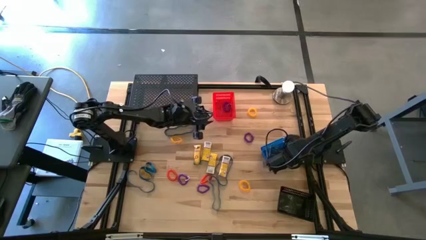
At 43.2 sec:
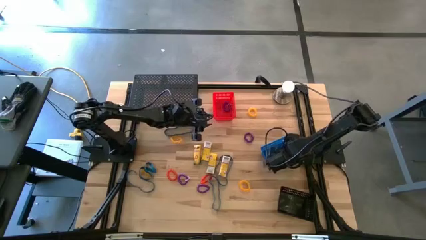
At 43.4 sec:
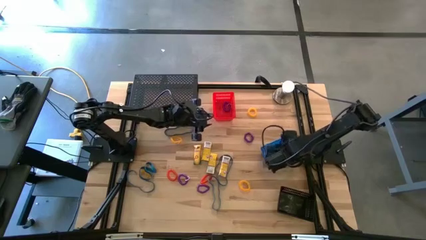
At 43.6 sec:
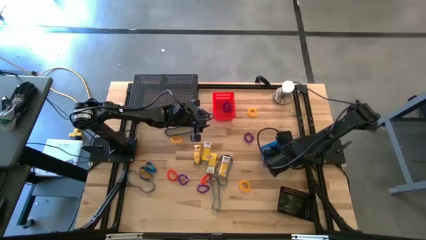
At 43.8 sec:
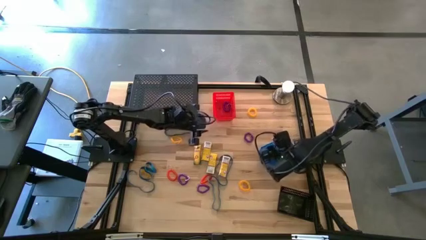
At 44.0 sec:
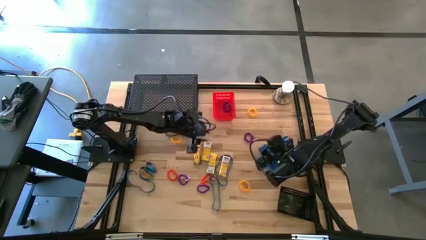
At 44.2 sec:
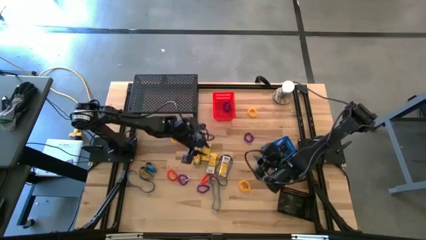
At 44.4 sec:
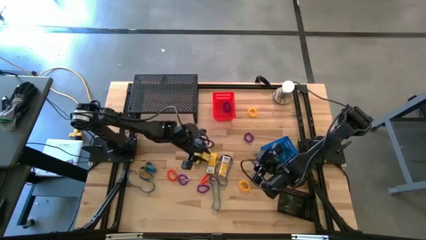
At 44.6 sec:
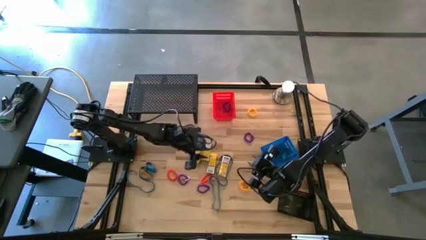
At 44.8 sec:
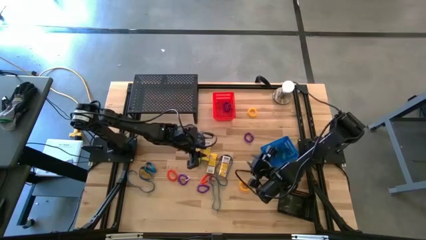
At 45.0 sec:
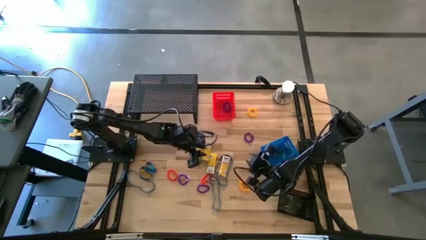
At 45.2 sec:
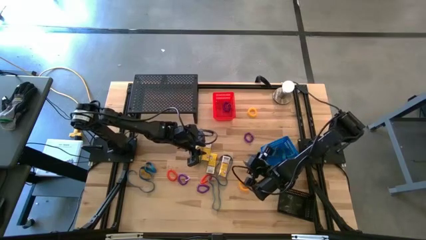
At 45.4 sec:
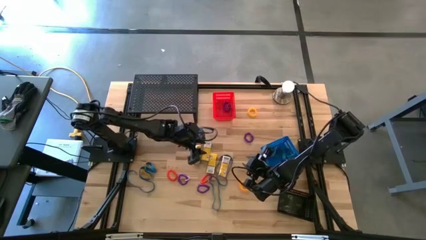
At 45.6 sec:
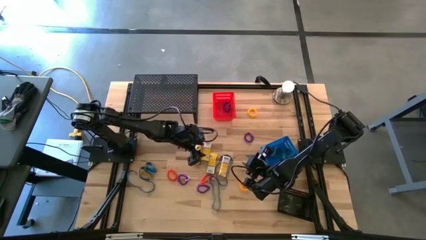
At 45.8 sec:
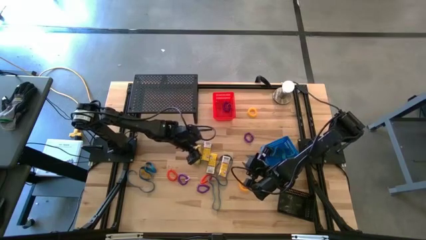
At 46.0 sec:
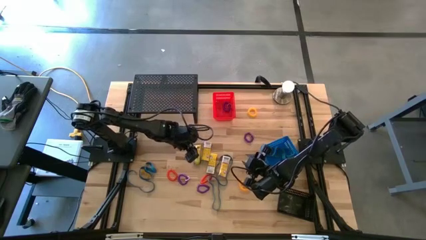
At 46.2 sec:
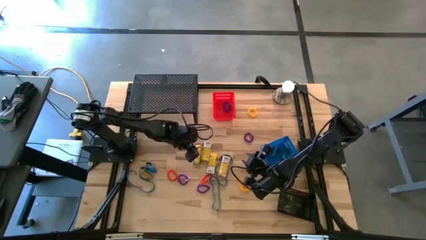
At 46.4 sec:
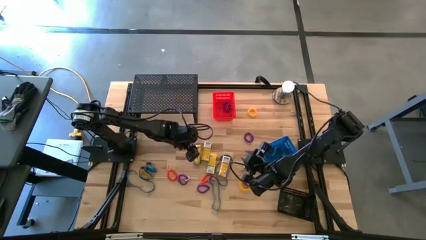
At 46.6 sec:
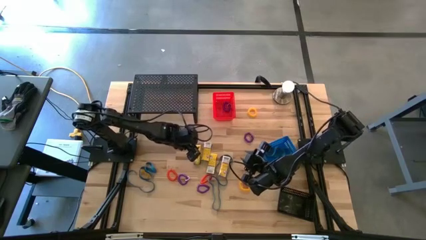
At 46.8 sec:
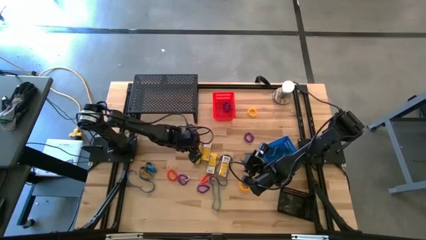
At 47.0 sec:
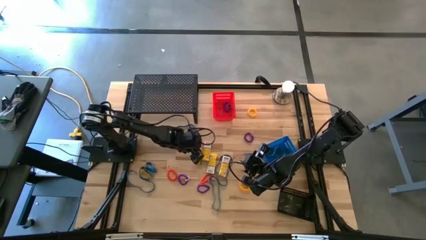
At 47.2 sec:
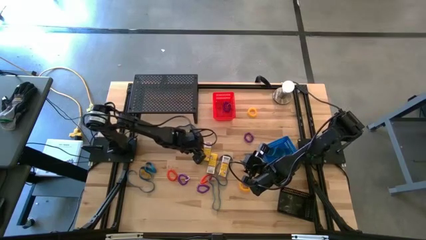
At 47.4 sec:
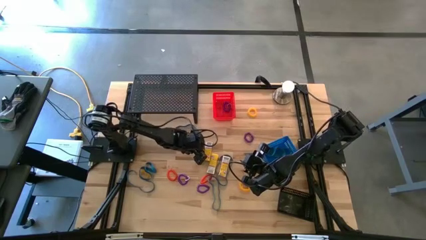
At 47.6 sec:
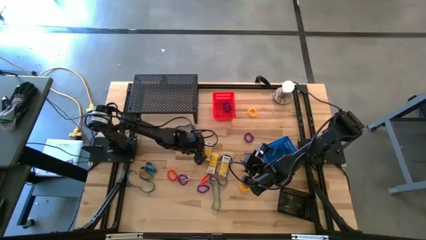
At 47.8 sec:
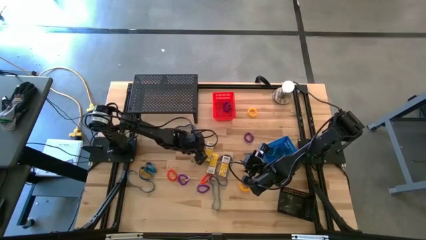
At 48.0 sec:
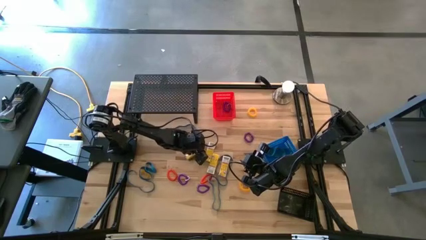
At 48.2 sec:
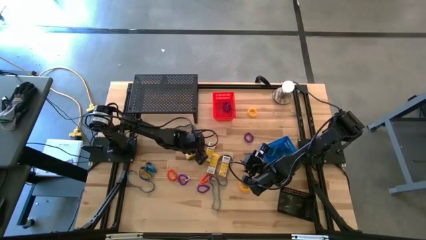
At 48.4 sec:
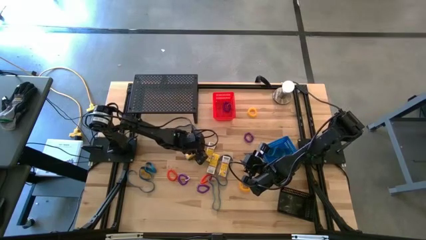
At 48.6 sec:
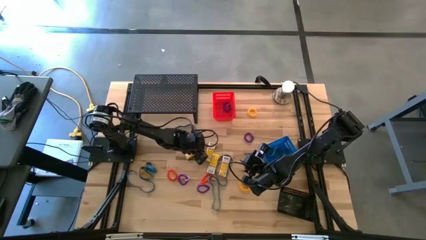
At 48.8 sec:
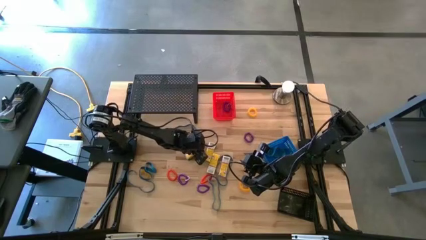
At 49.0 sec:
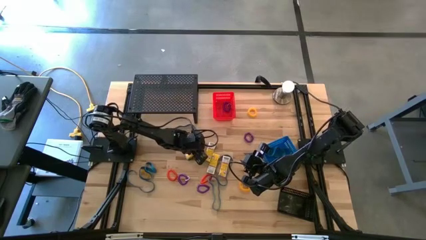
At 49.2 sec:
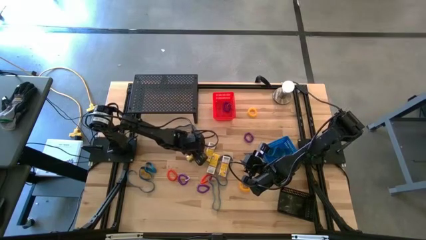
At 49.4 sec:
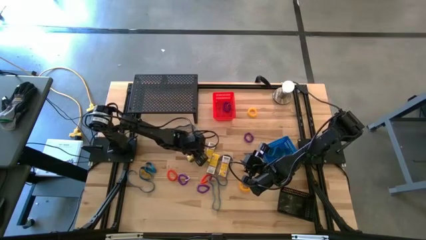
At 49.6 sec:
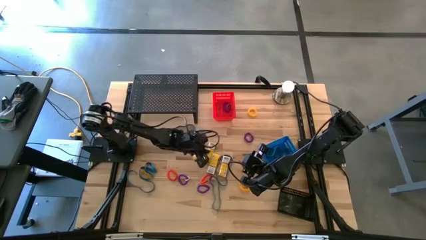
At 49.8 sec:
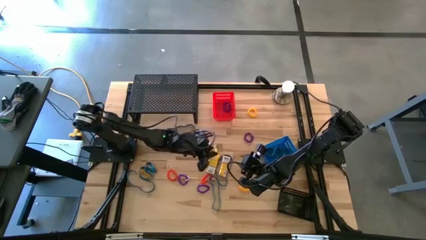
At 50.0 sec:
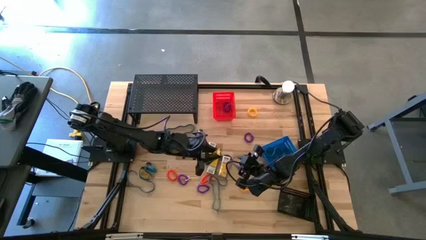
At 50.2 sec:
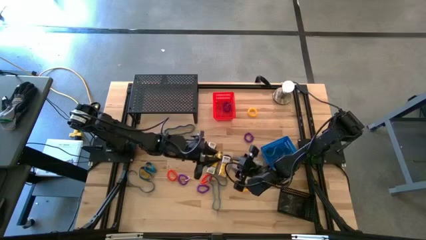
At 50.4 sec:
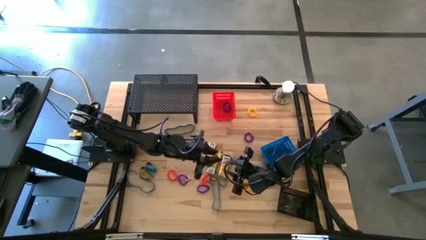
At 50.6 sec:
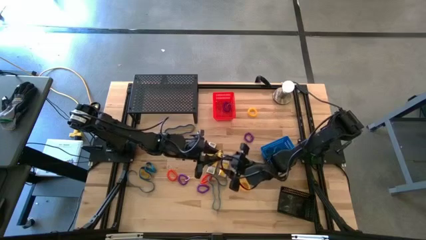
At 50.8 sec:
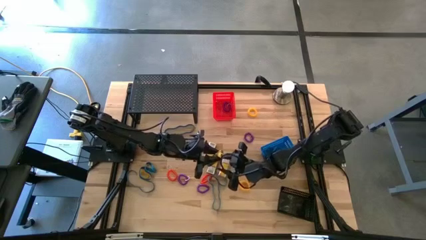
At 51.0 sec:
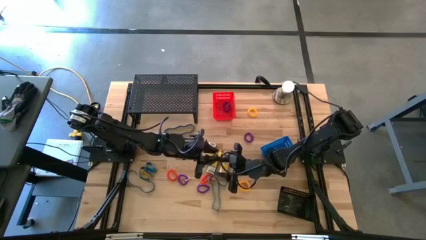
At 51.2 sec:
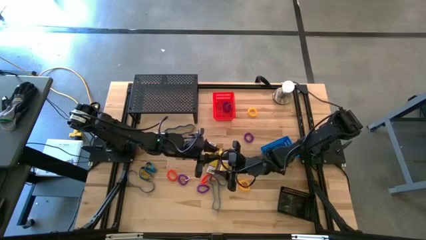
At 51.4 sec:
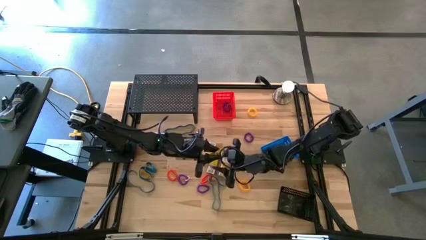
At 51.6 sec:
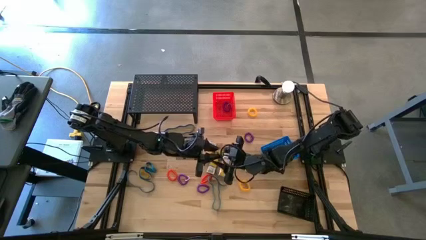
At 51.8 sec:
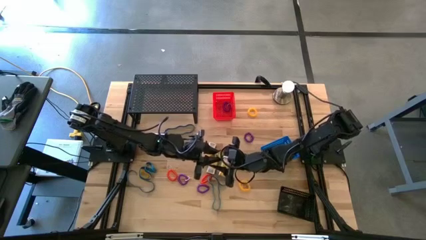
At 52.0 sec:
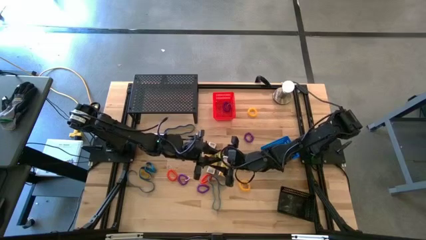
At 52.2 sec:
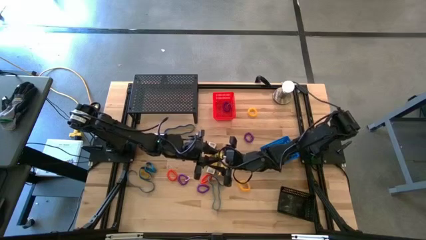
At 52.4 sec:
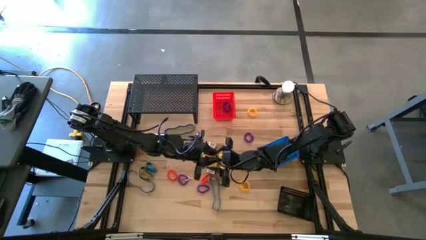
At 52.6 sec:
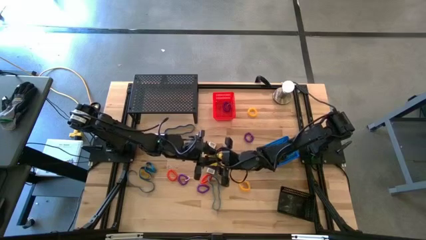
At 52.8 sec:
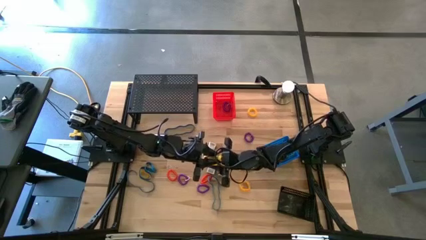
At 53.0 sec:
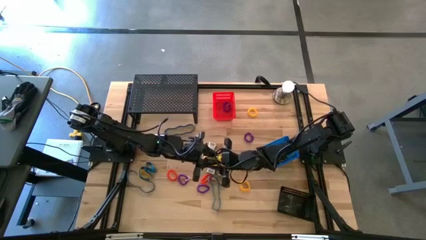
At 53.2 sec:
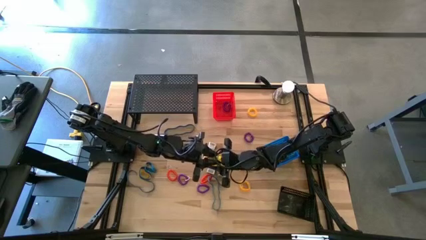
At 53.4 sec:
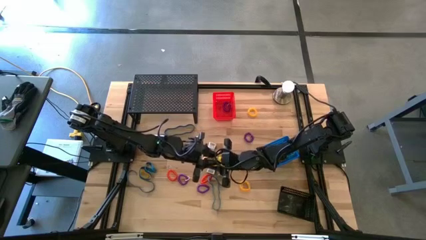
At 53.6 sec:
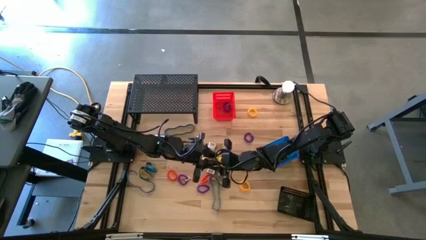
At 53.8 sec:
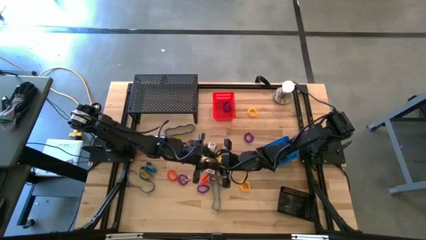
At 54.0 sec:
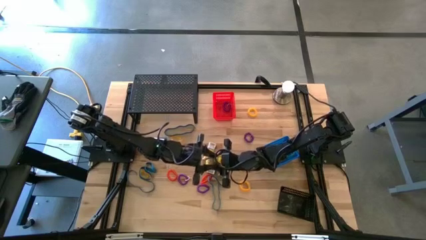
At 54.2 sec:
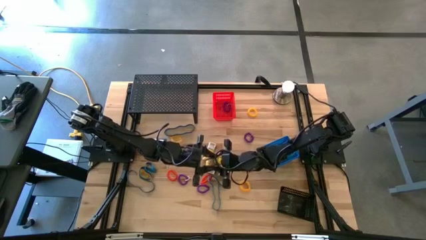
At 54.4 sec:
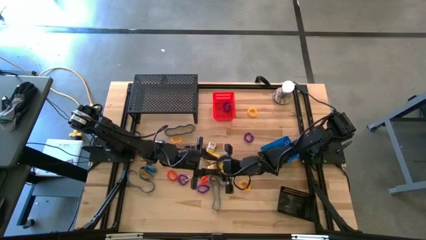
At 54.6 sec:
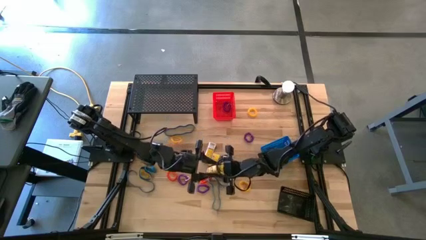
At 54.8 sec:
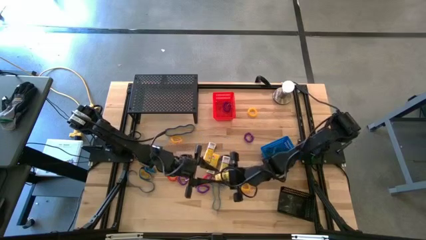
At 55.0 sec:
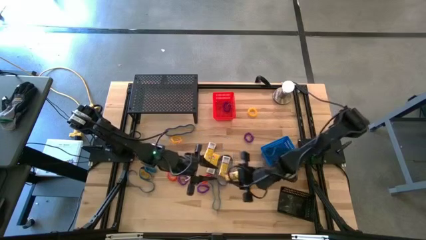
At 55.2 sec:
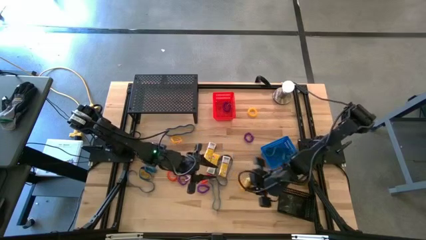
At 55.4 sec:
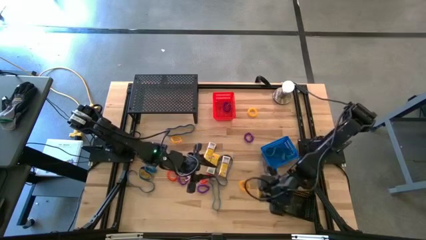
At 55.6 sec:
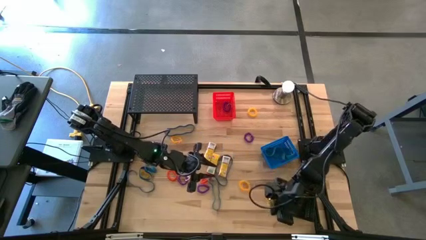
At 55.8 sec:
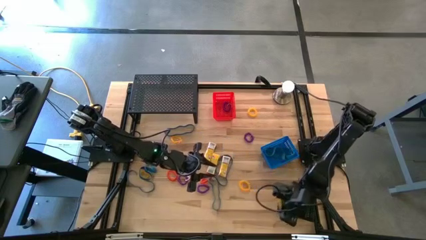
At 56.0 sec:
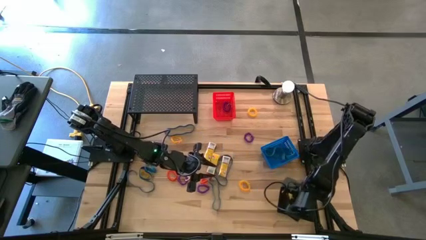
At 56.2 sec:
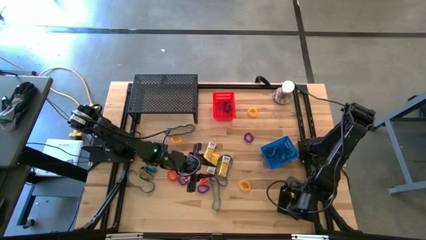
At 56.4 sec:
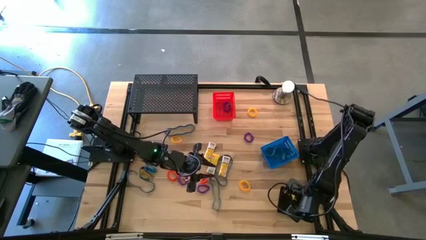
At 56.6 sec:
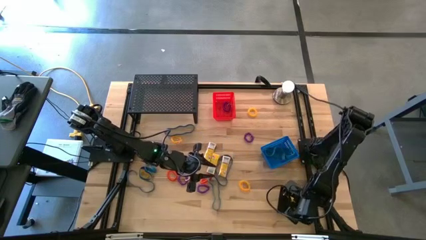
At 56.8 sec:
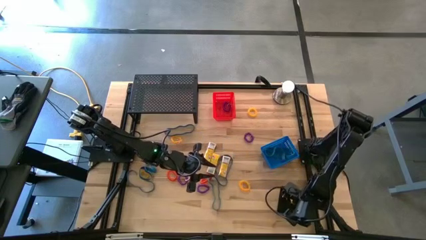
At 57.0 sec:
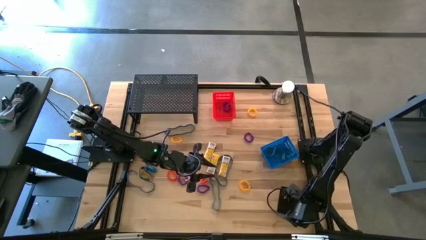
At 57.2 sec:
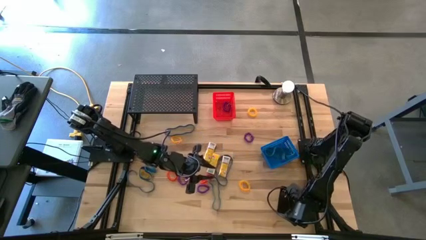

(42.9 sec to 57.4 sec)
Task: Pick & Place Office Desk Supplies
Put the crayon box into the black bin

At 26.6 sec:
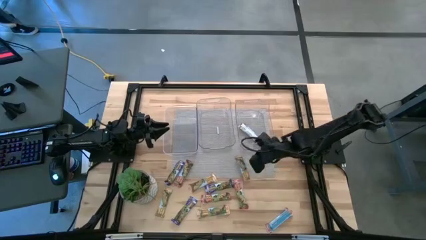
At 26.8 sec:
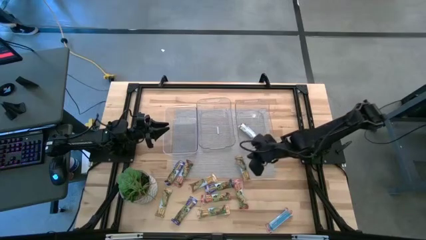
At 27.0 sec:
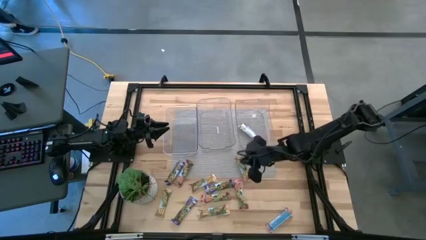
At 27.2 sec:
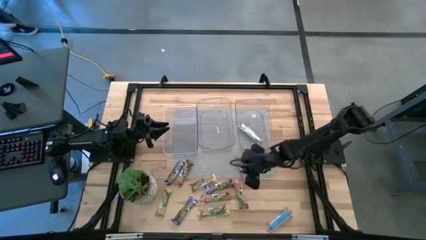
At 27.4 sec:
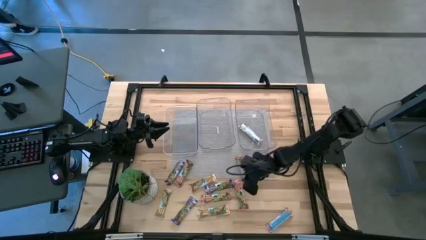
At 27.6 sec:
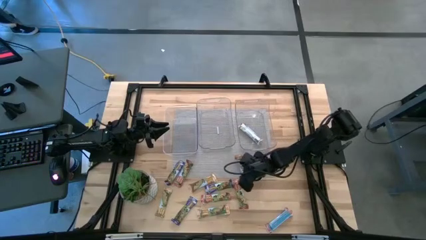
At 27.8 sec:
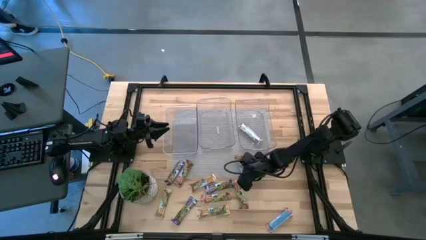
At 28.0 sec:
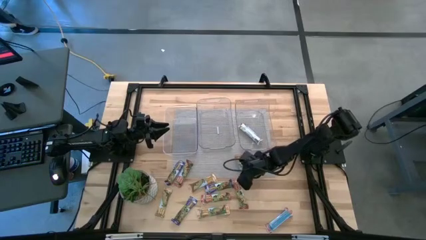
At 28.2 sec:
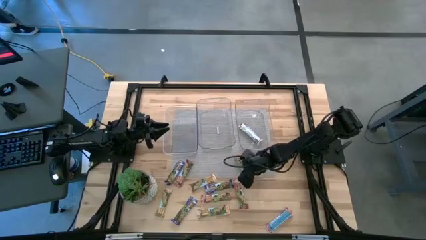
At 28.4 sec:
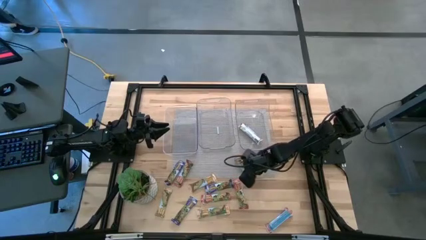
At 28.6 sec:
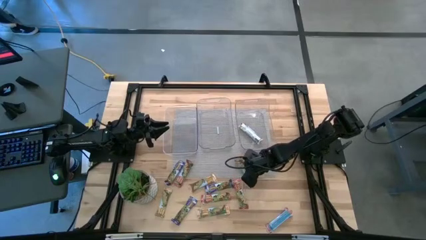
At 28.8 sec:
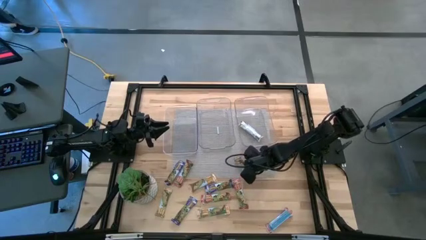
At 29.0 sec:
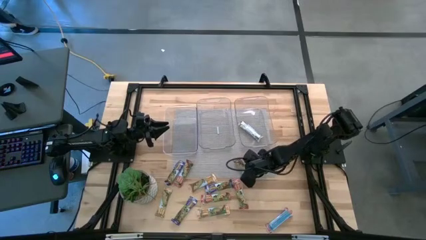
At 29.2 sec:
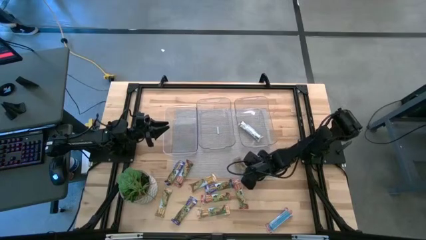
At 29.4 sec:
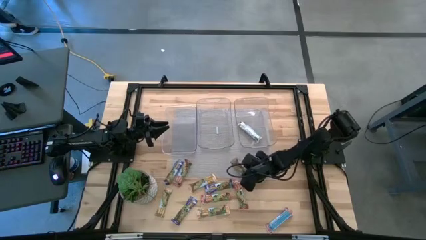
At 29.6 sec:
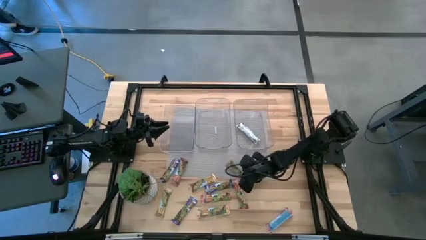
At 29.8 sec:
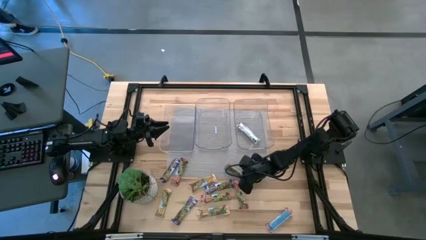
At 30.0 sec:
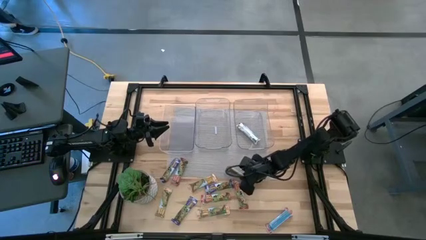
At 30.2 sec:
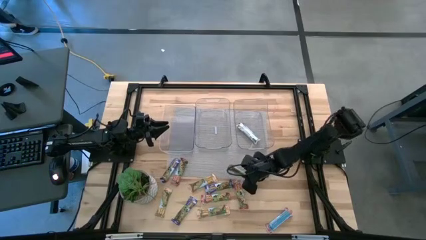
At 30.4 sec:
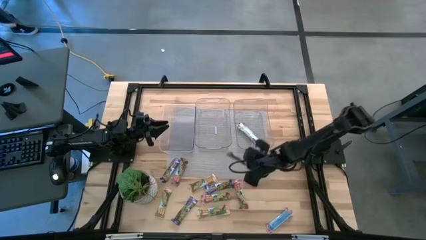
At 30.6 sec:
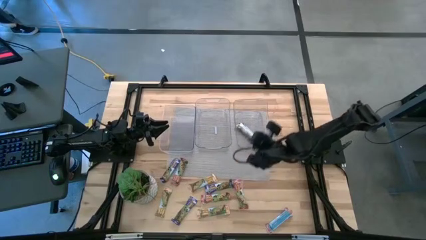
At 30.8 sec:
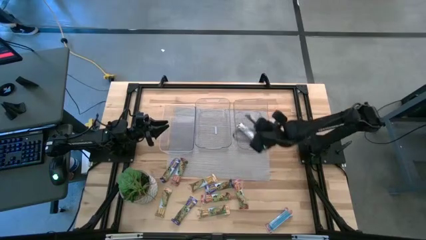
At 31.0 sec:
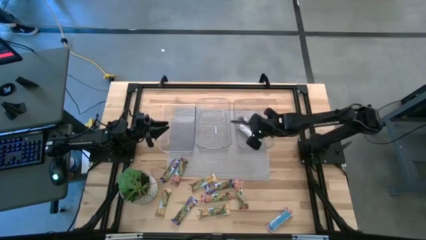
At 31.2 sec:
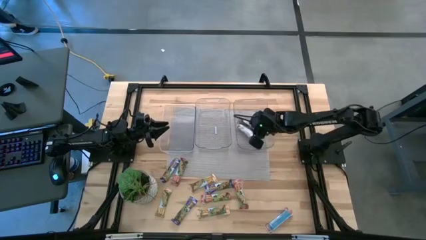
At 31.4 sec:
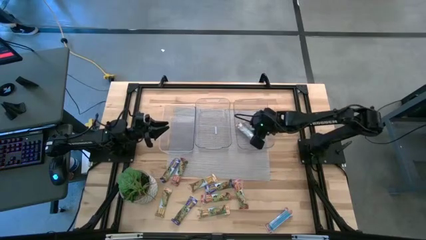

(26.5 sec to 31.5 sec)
Task: Pick and place Granola Bars by type
Put the orange granola bar into the right transparent bin
